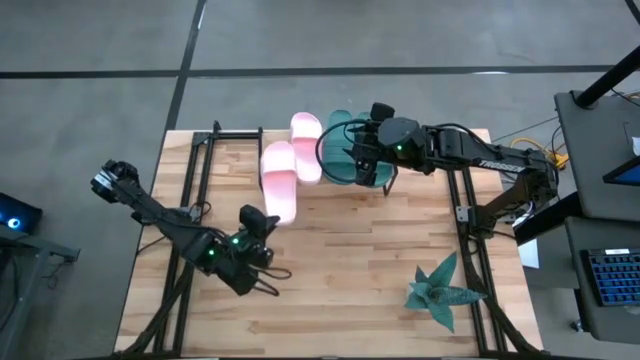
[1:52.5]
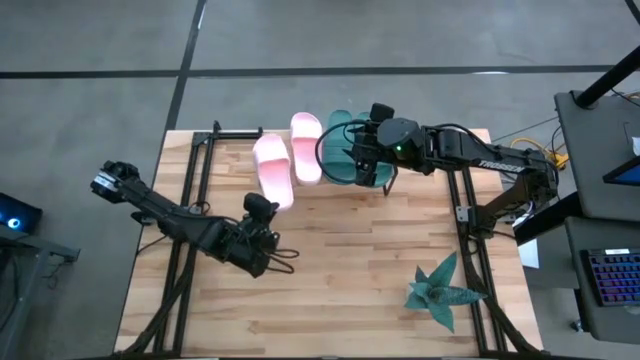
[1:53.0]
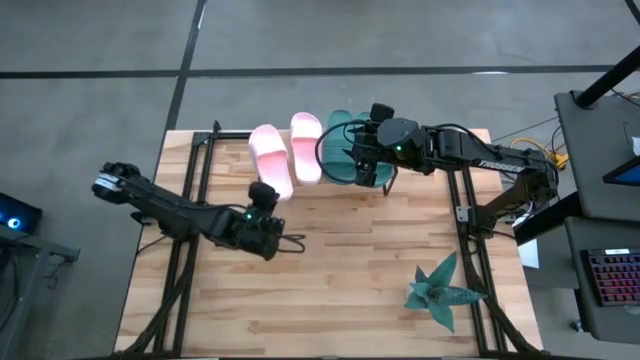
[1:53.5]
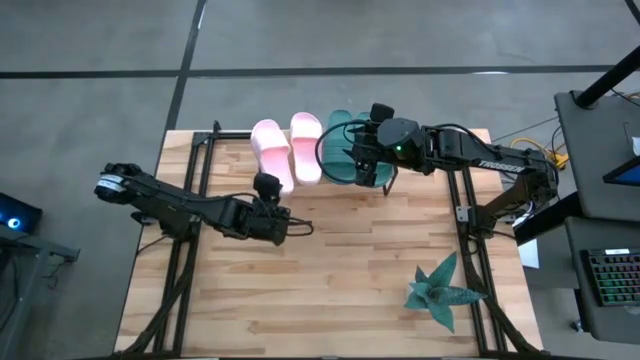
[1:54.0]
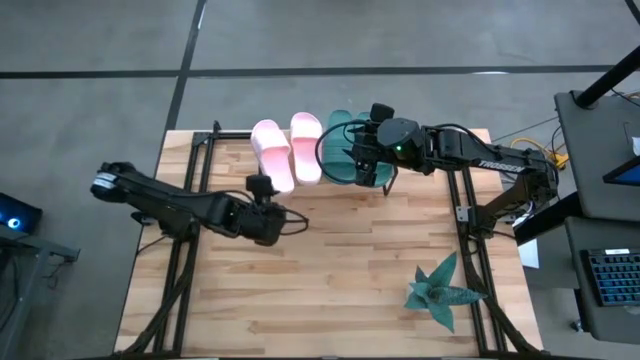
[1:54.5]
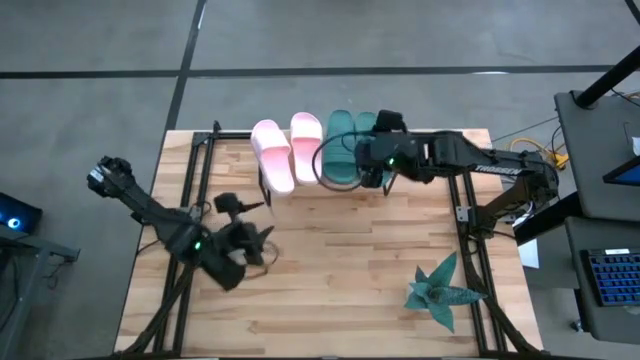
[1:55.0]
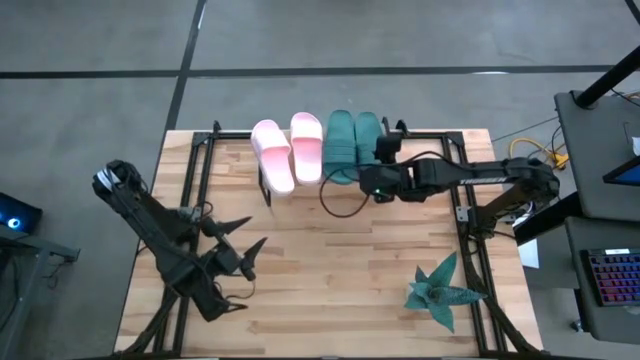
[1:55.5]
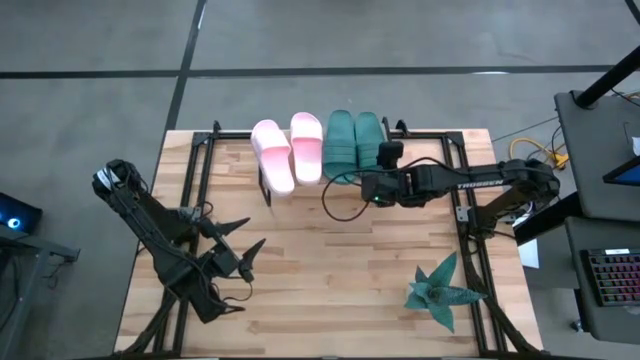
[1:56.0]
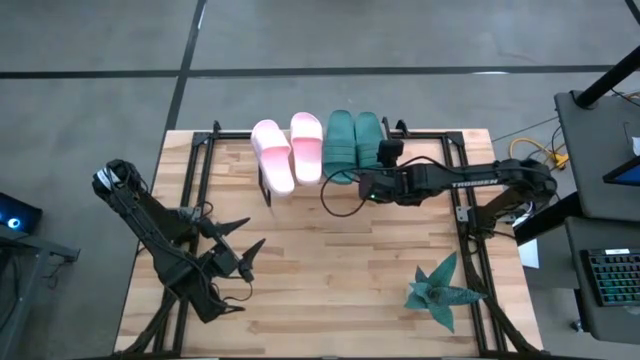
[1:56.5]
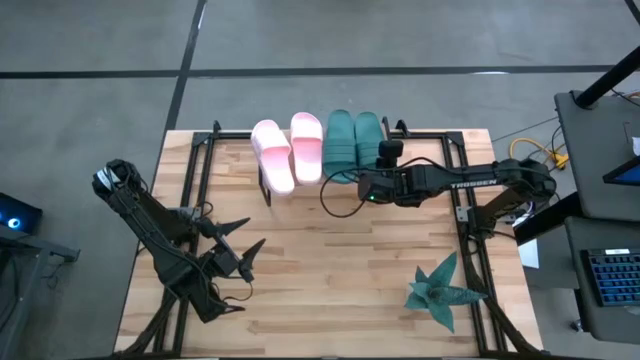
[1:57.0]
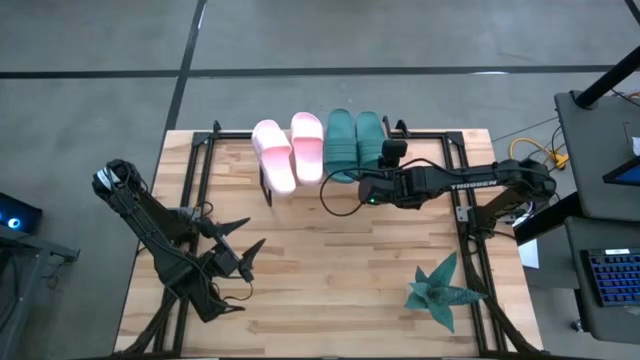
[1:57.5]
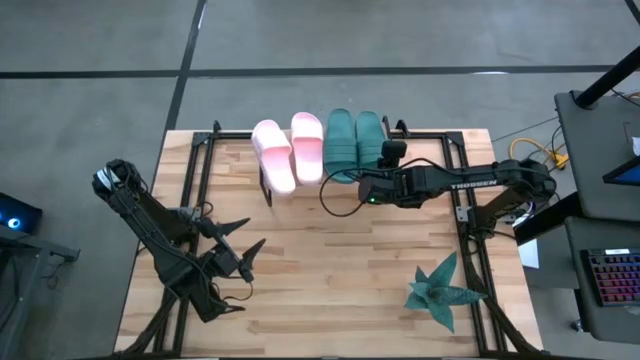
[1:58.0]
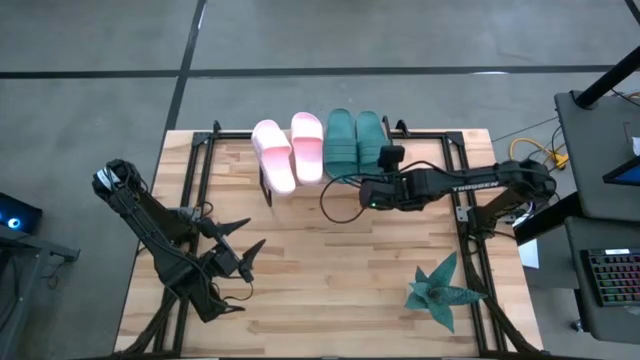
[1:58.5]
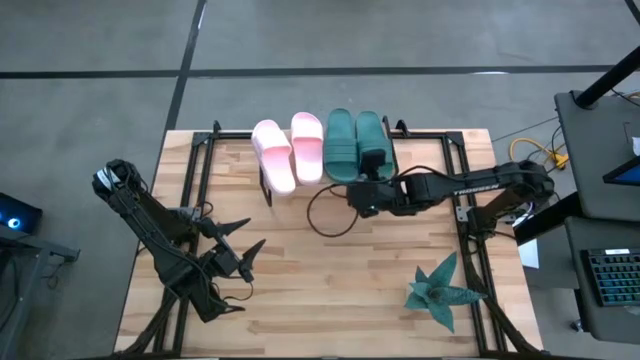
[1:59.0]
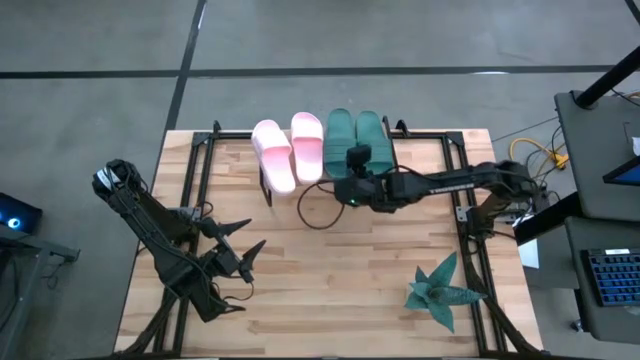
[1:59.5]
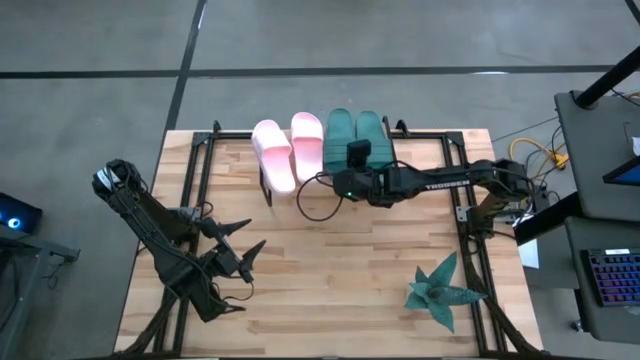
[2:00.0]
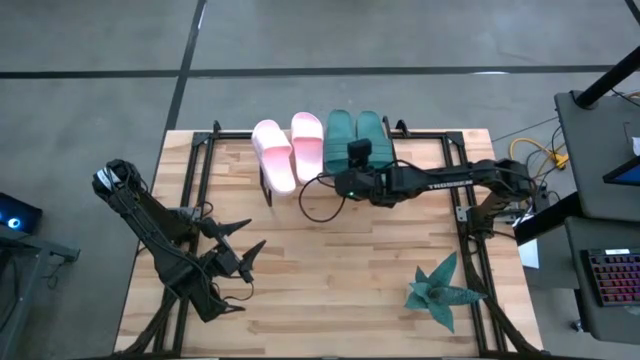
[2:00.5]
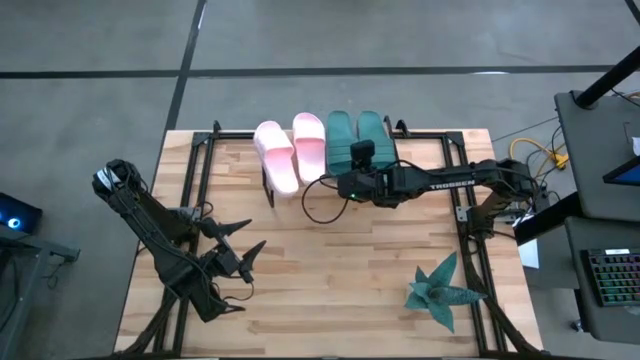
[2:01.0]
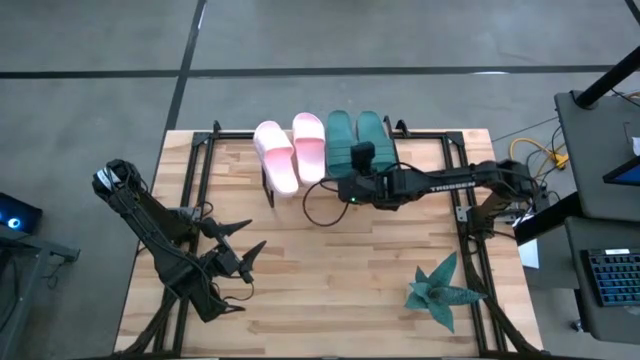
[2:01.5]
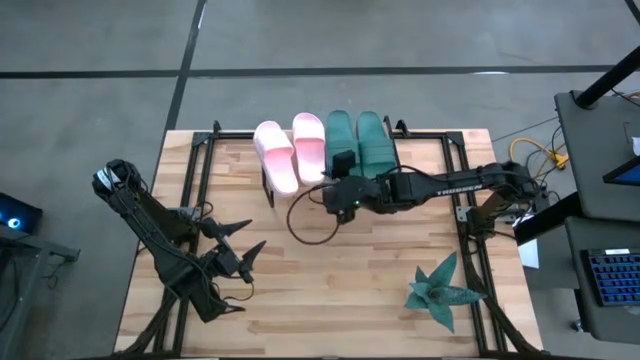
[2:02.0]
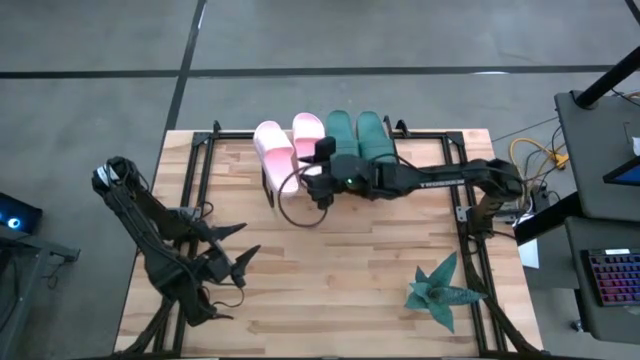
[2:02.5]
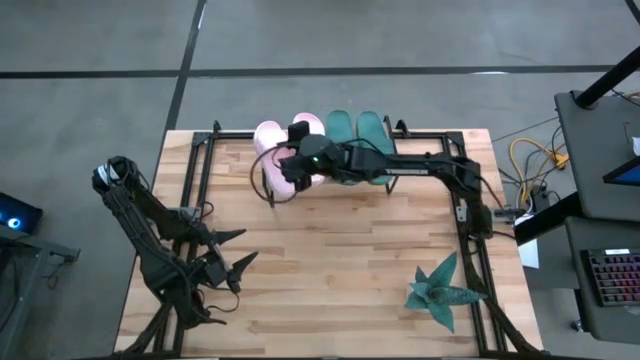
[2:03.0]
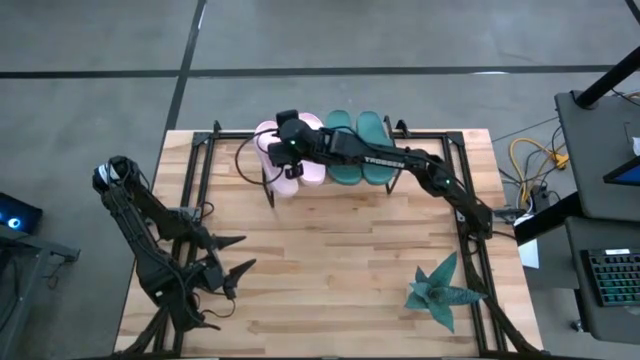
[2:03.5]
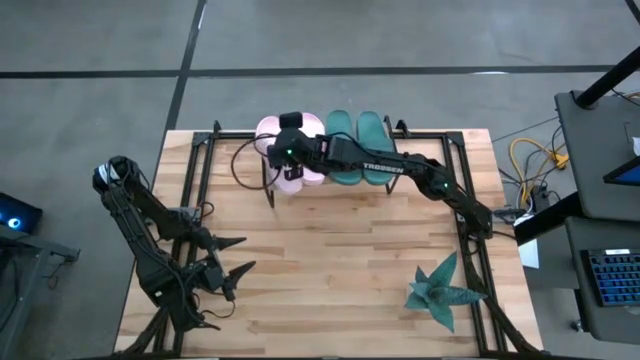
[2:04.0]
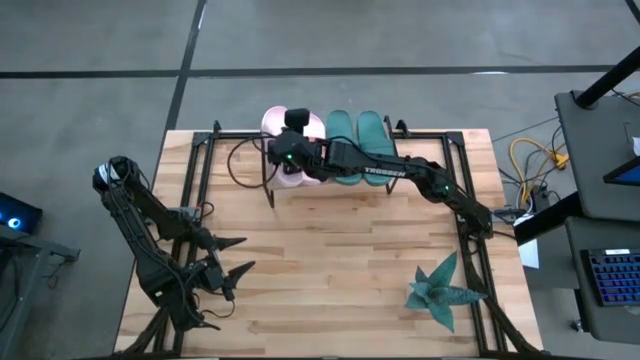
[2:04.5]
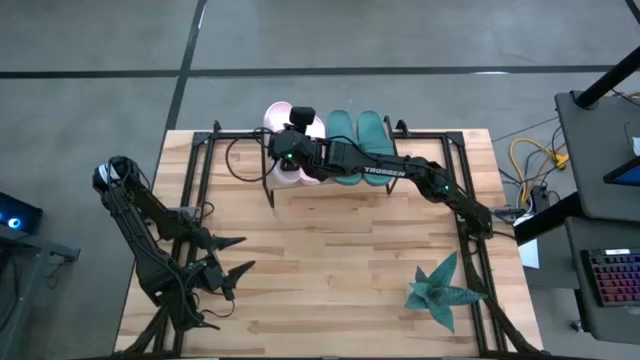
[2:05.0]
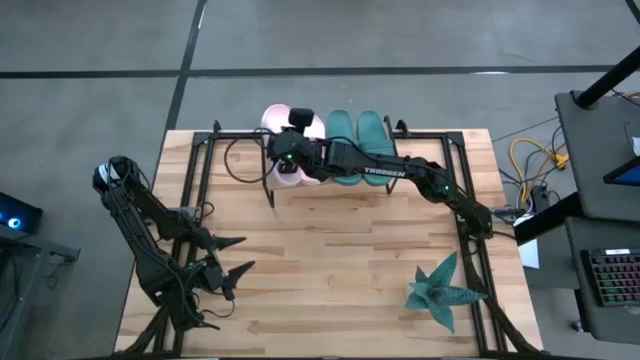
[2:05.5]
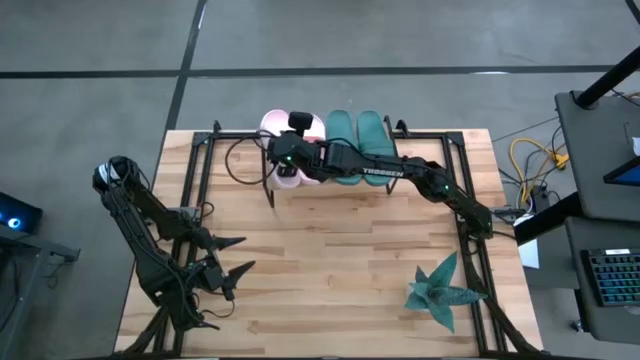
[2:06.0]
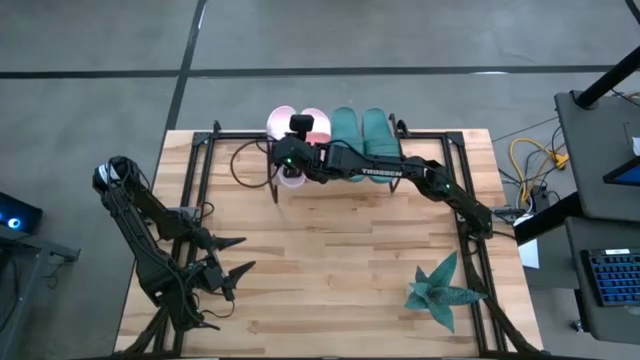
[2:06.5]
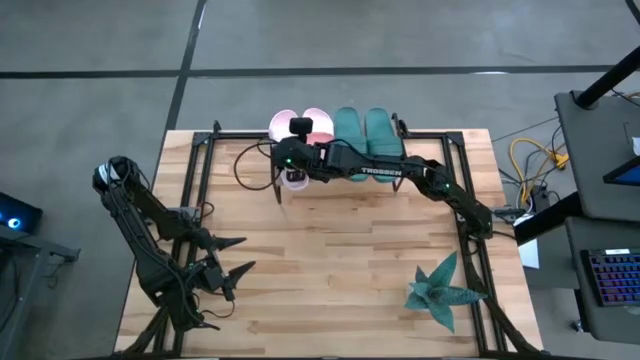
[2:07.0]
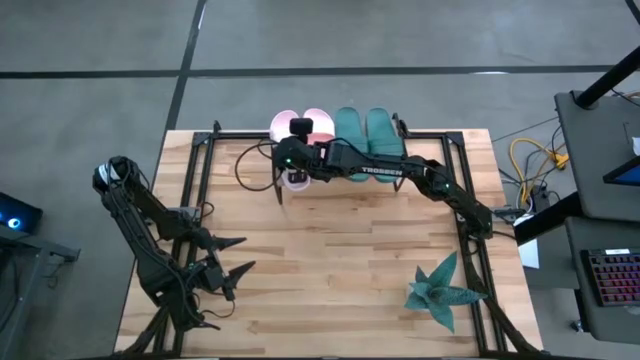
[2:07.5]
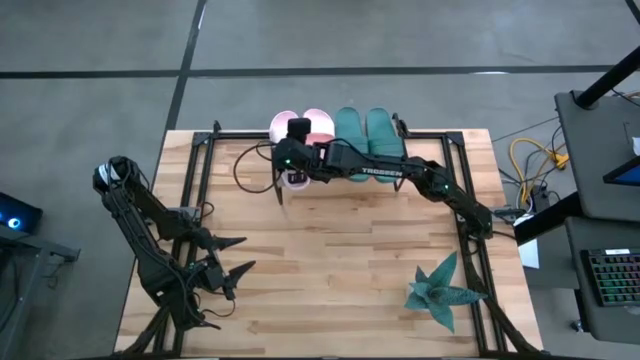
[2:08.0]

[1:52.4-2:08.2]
Task: Pick and place slides into the shelf
Adjust the slippers on the shelf

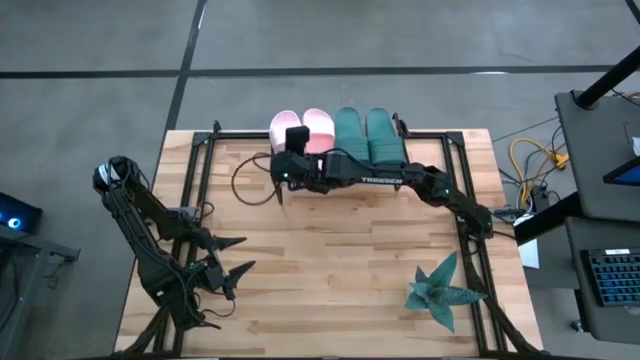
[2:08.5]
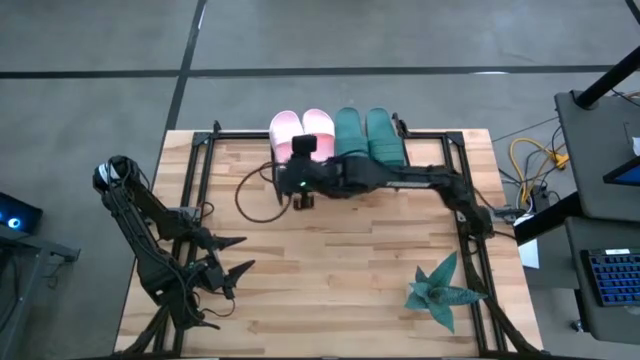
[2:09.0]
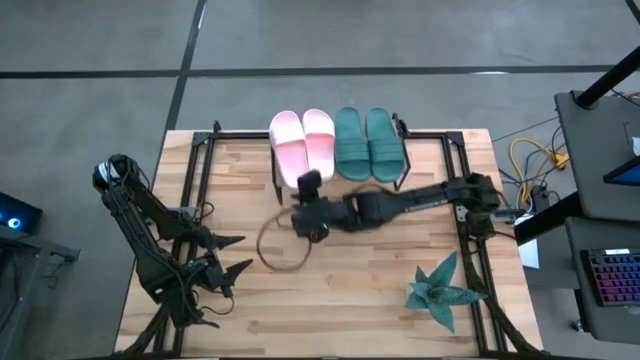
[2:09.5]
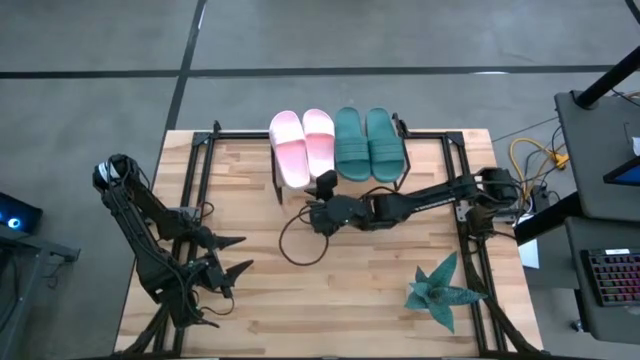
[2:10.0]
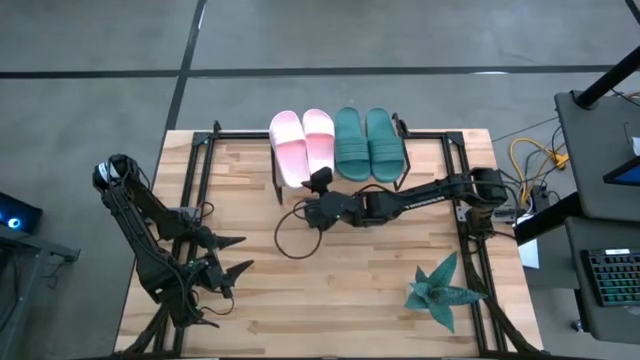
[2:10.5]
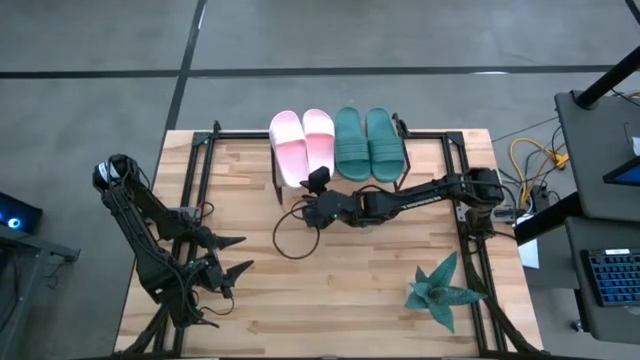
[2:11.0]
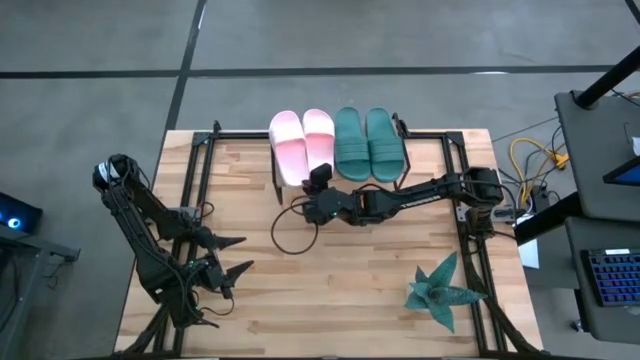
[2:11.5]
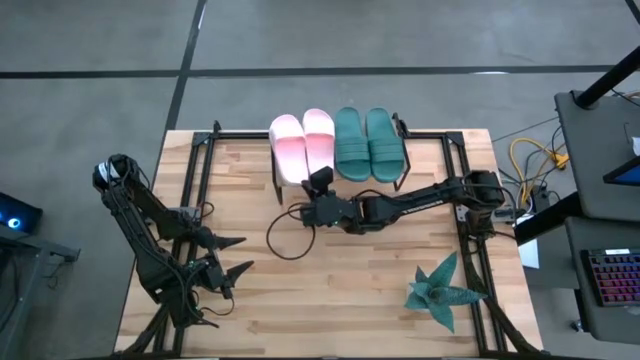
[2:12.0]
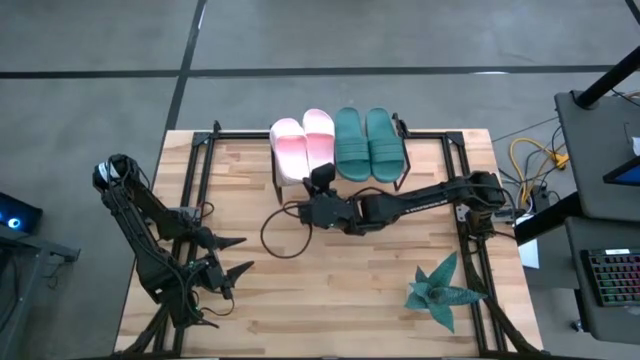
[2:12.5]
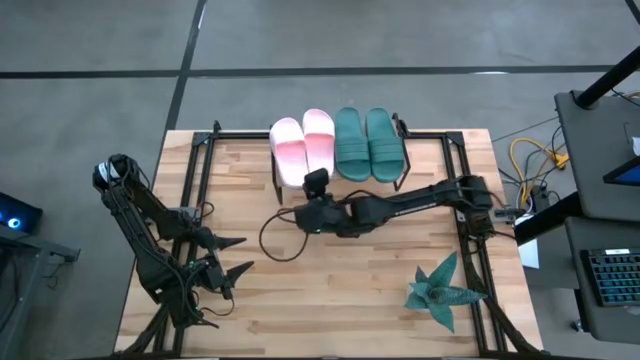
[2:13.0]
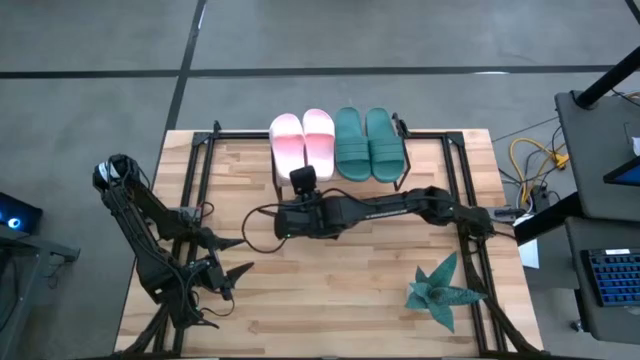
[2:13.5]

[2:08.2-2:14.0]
Adjust the left pink slipper on the shelf
